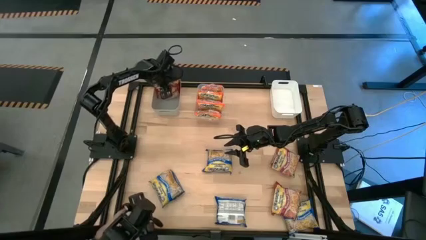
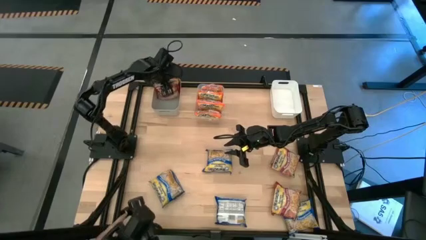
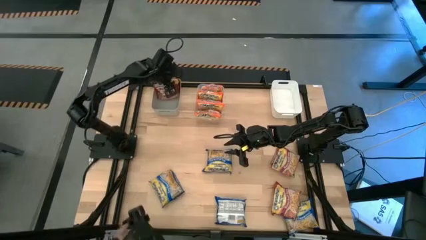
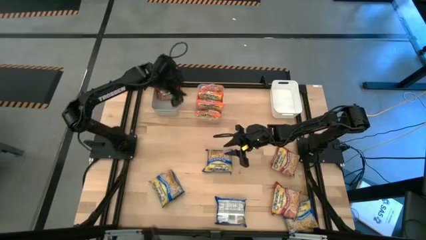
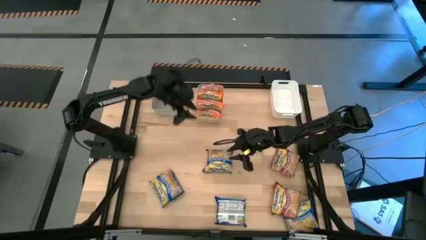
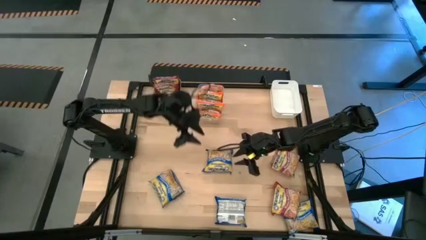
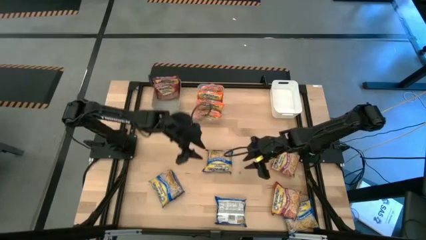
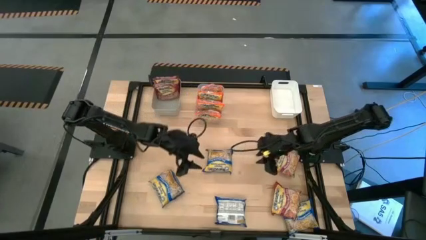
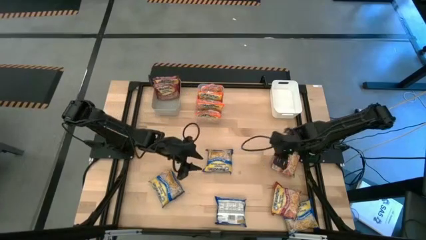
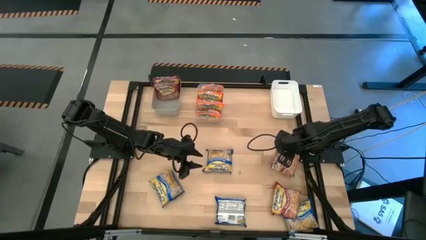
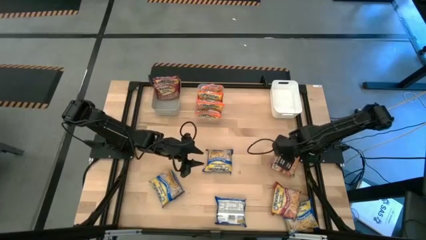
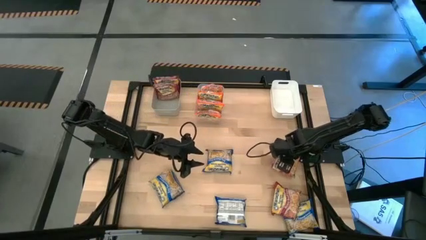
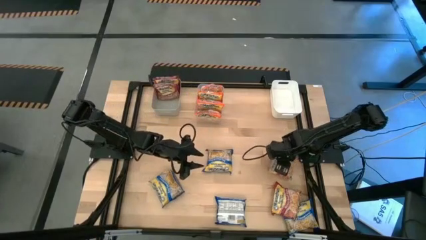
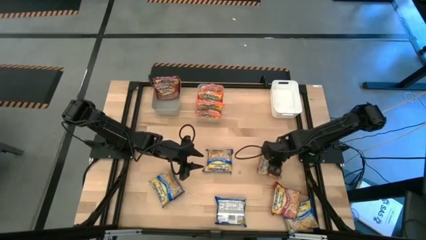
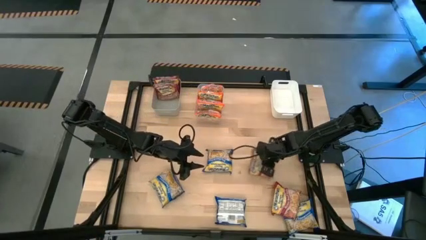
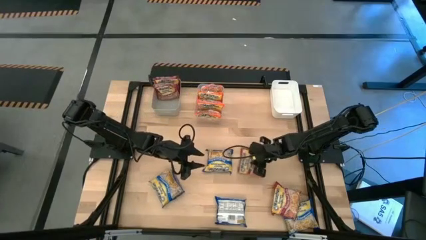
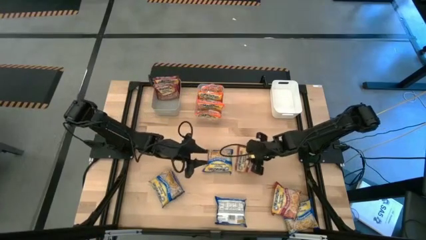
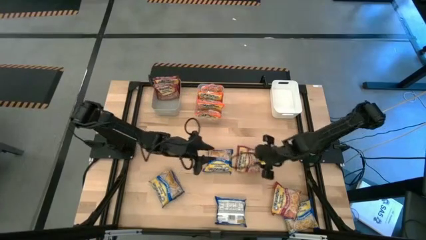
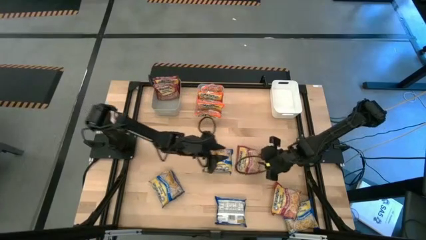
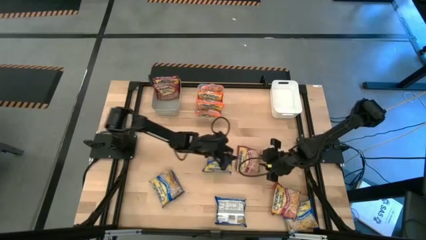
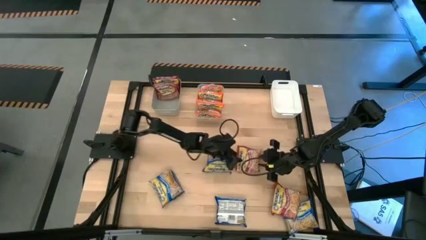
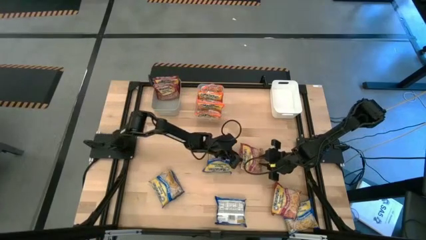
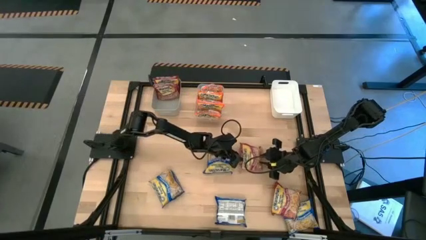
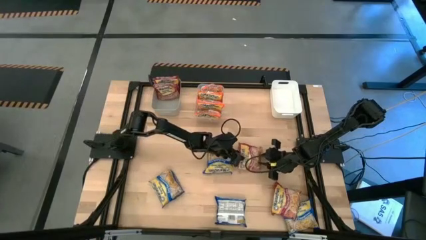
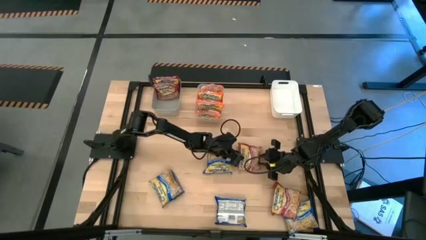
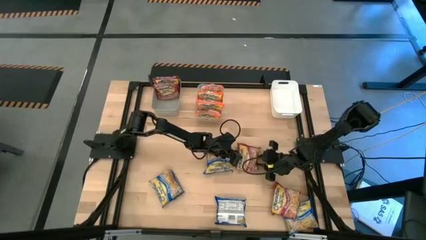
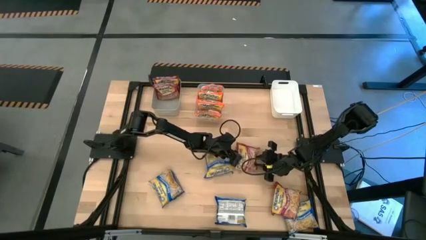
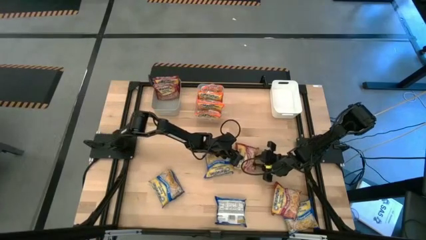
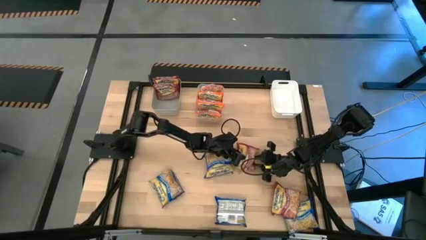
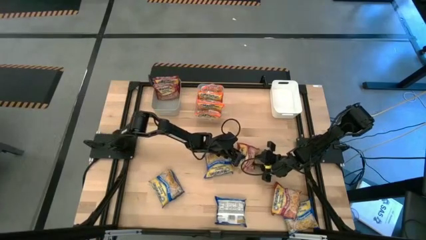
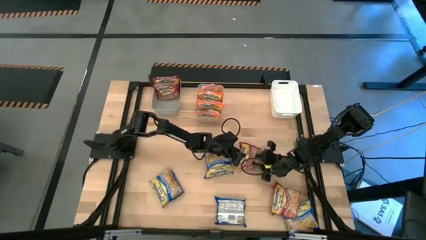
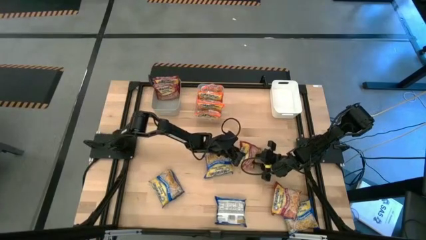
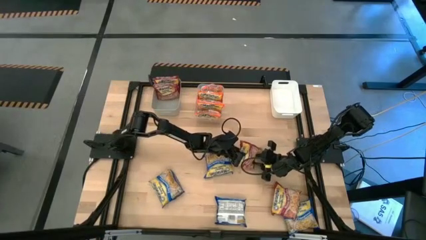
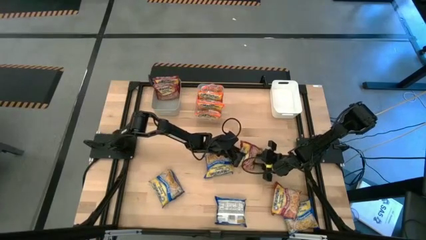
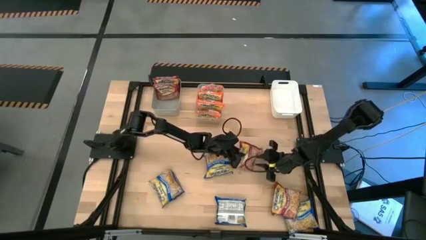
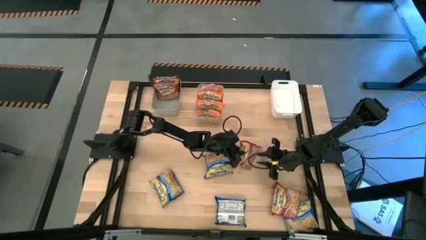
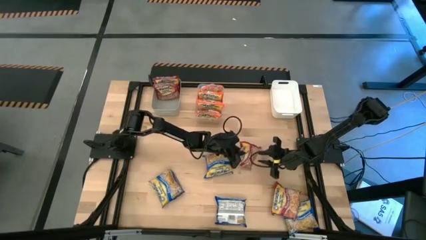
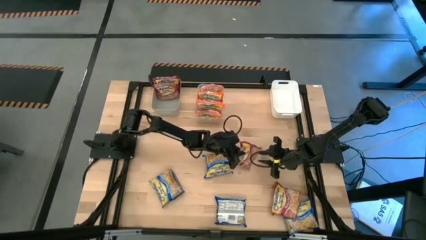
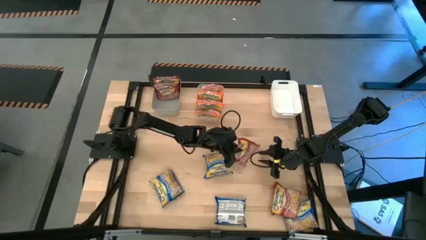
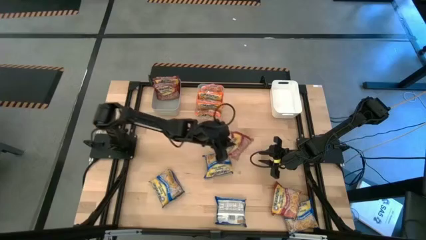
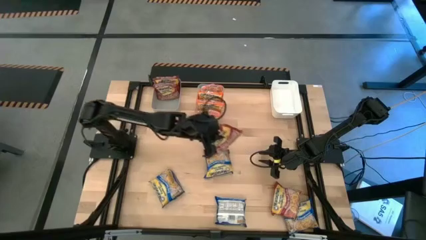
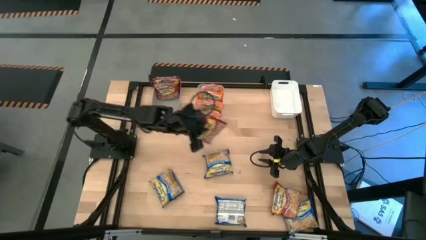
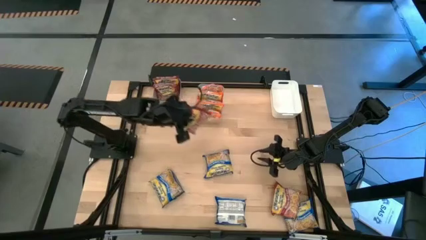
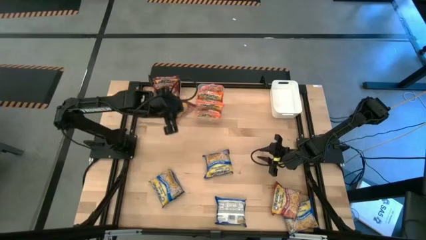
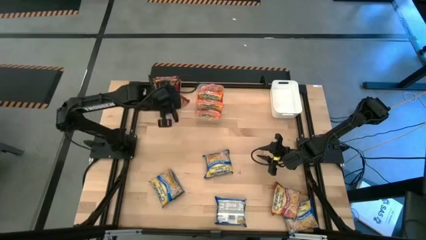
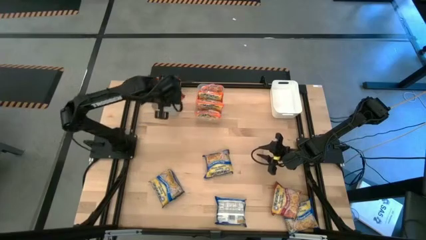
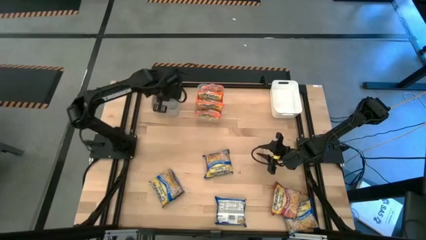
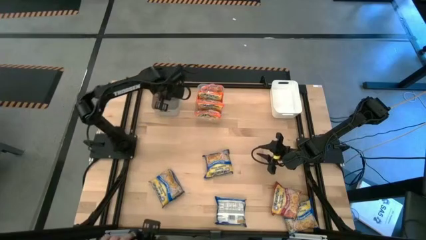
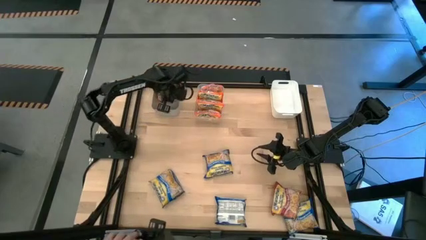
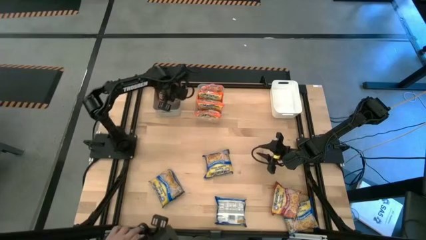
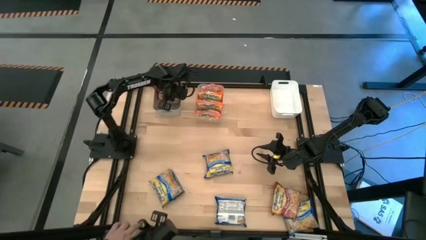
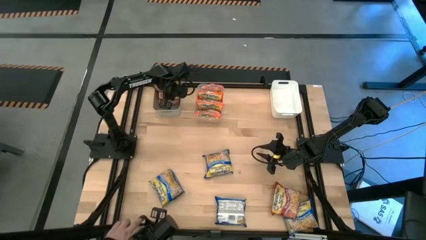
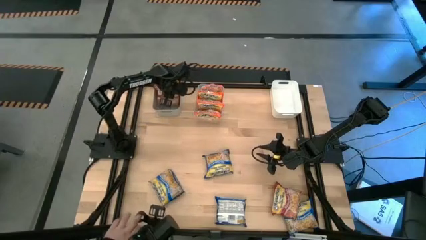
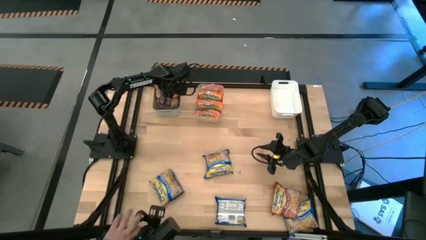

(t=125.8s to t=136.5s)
Task: Sort Maruchan noodles
Put the top red noodle into the gray bin

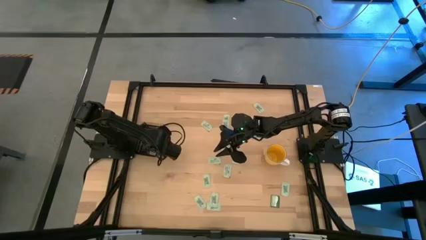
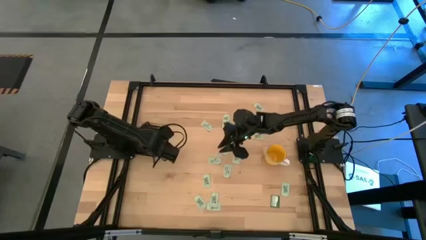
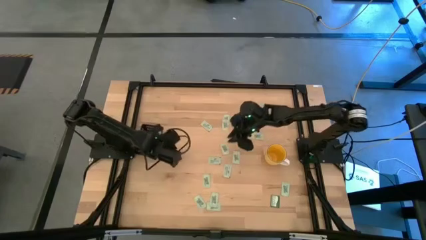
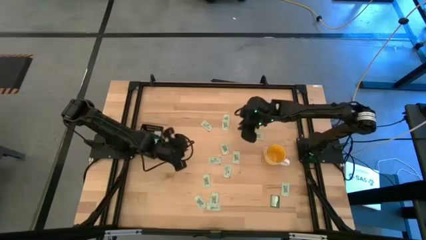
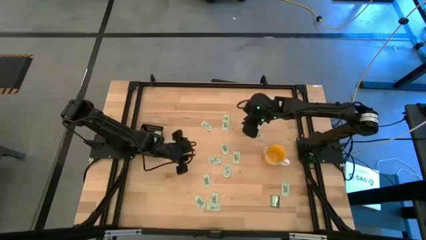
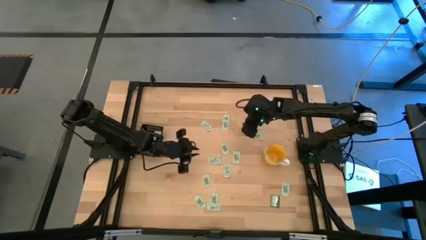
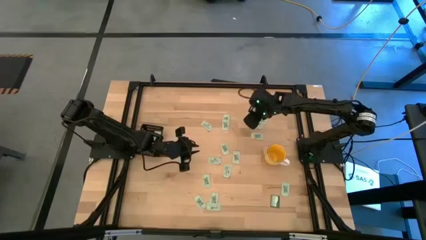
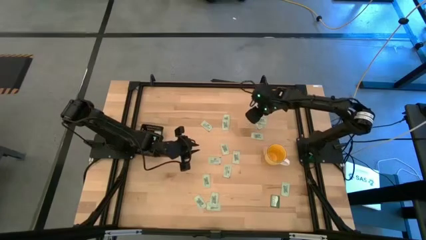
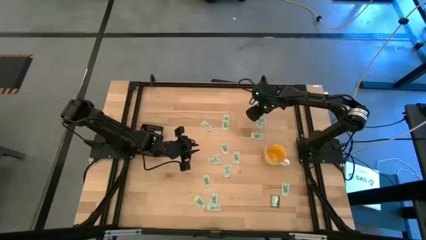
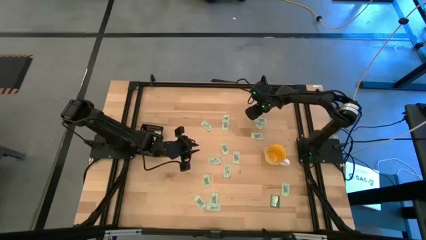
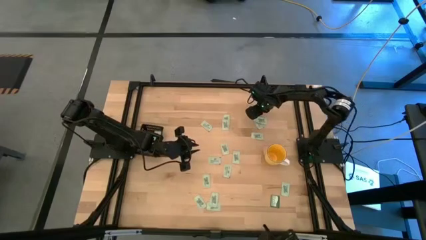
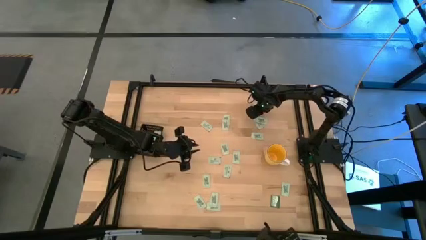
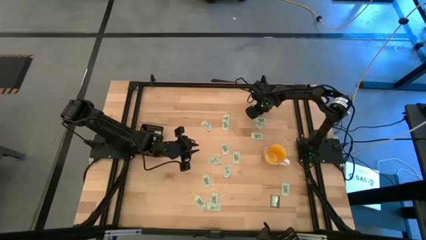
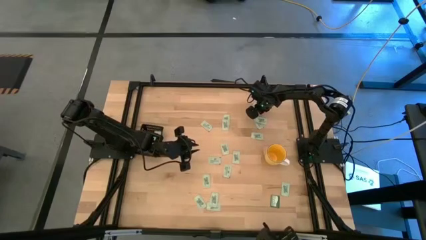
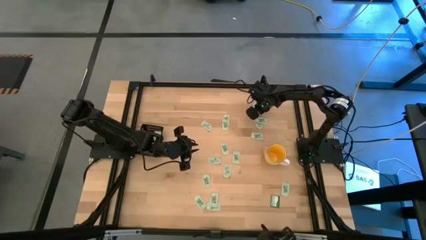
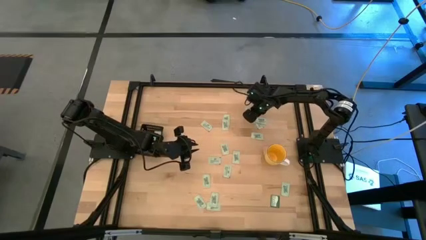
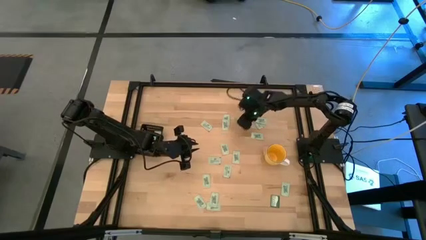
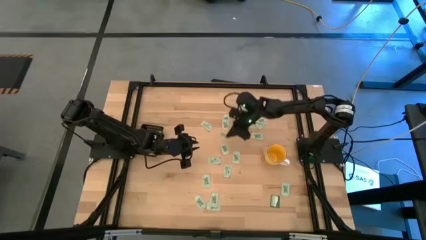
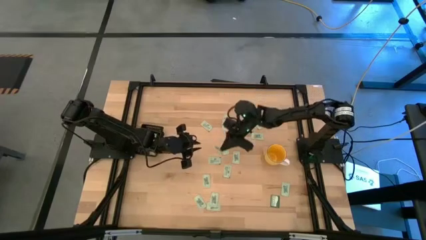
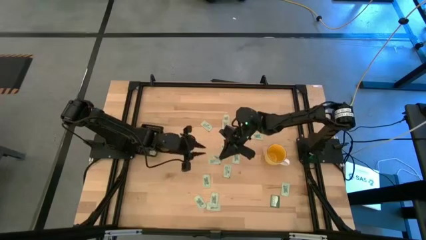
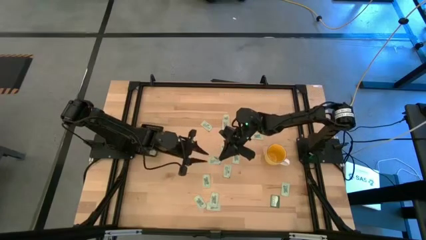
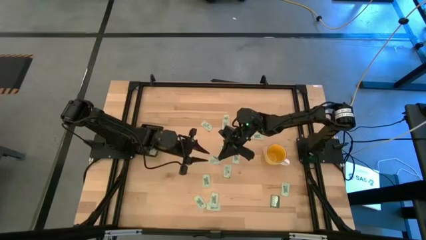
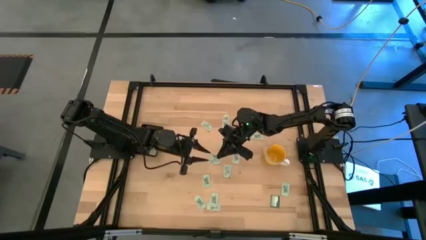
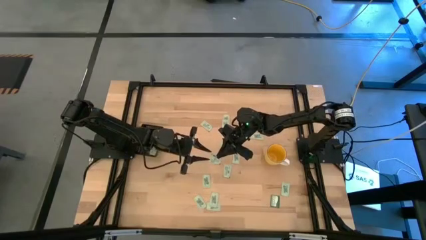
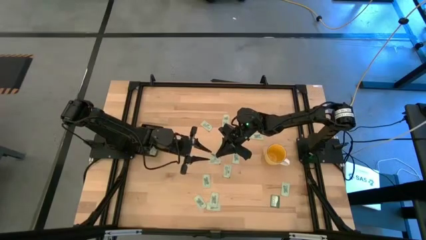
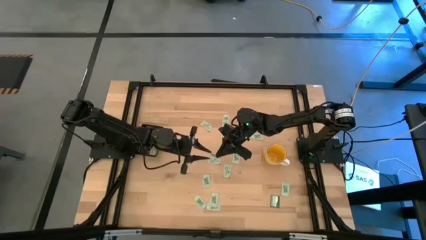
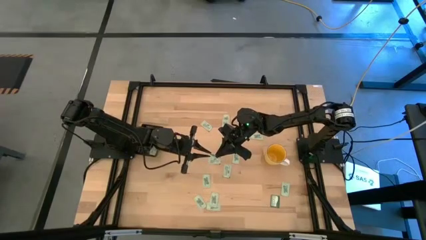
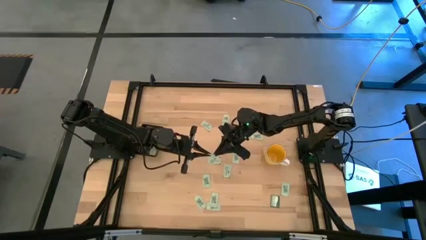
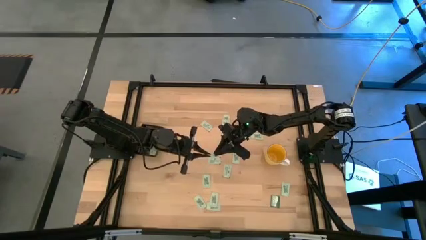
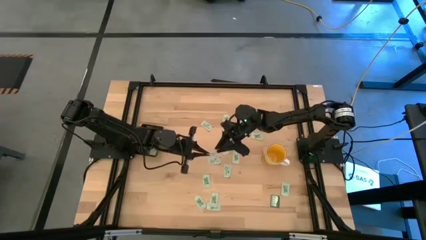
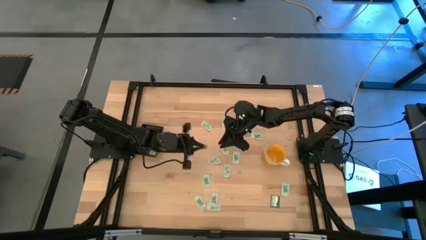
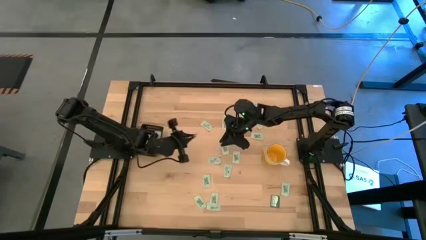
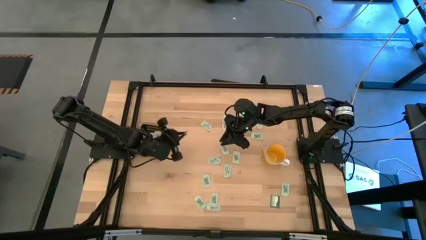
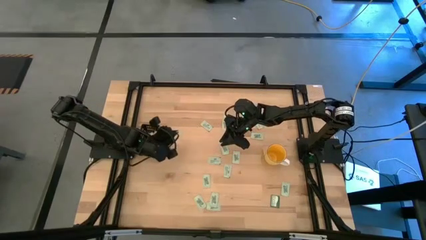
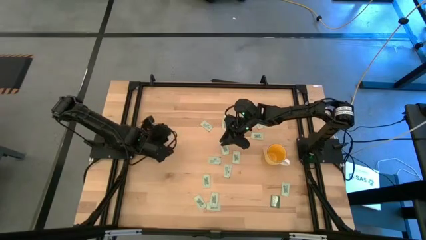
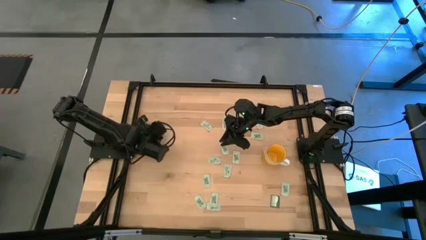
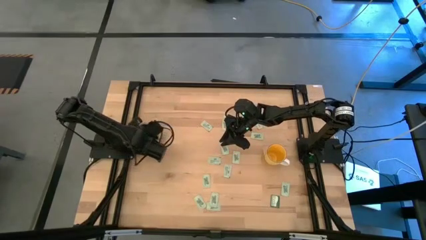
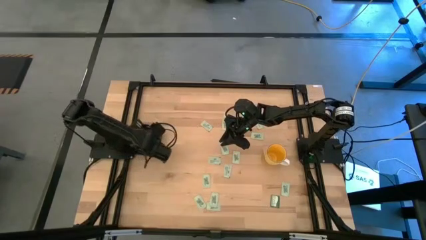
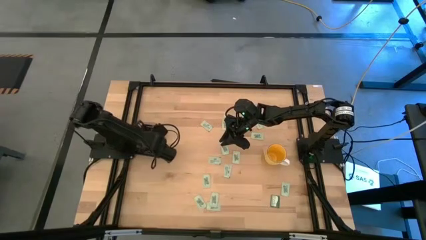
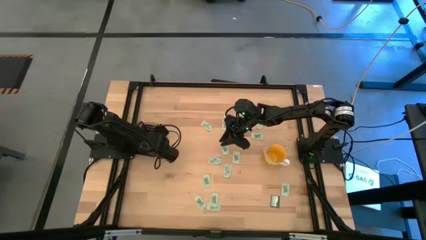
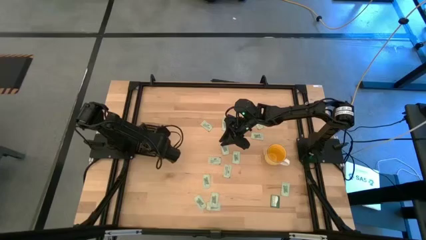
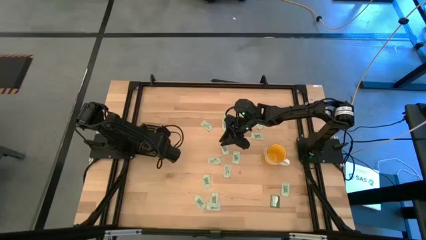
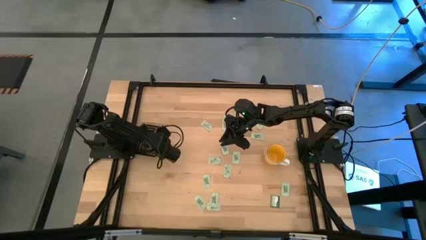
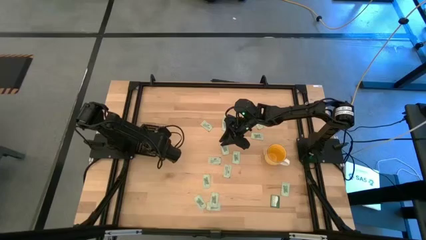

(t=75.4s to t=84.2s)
Task: Pick and place Stevia / Truvia into bins
Put the stevia packet into the black bin
